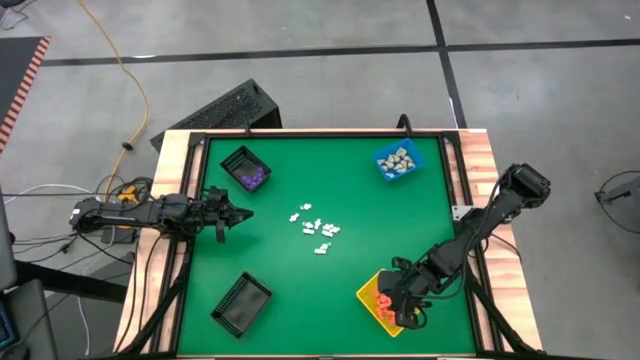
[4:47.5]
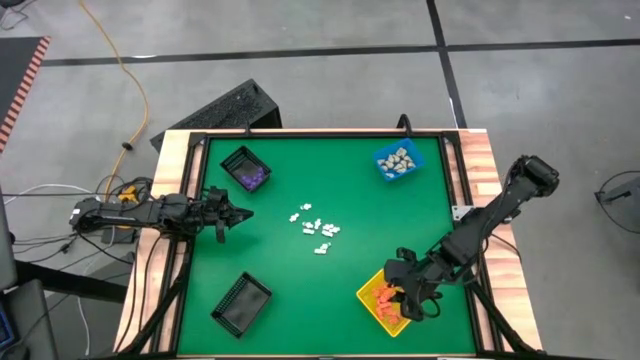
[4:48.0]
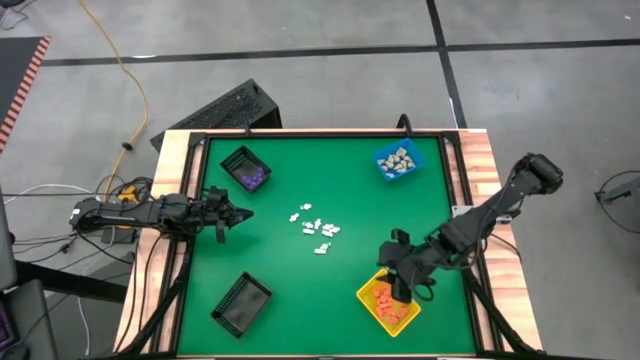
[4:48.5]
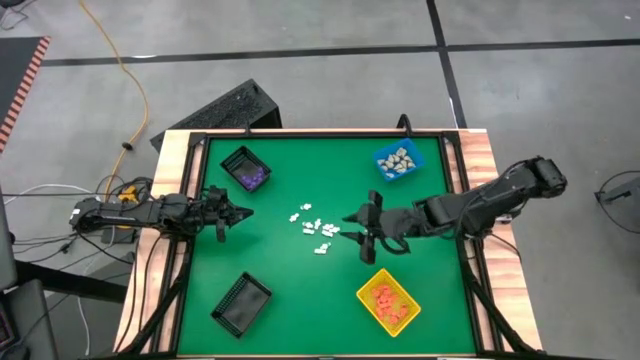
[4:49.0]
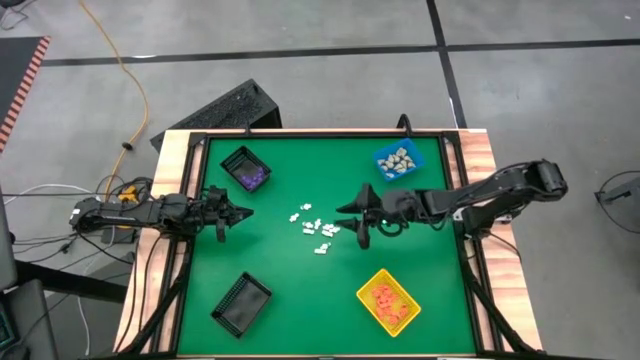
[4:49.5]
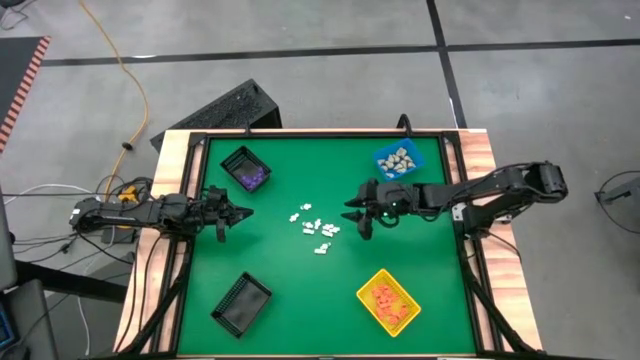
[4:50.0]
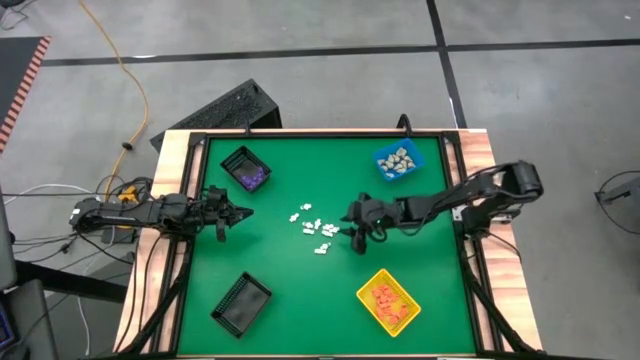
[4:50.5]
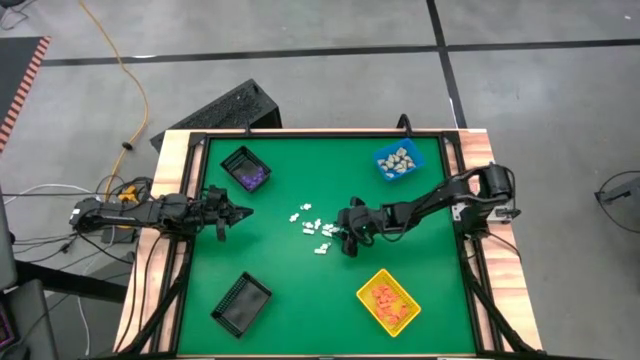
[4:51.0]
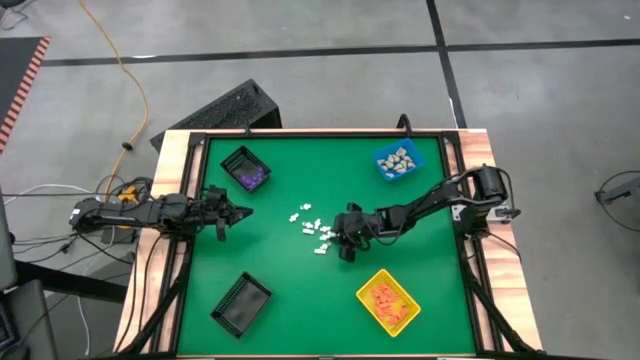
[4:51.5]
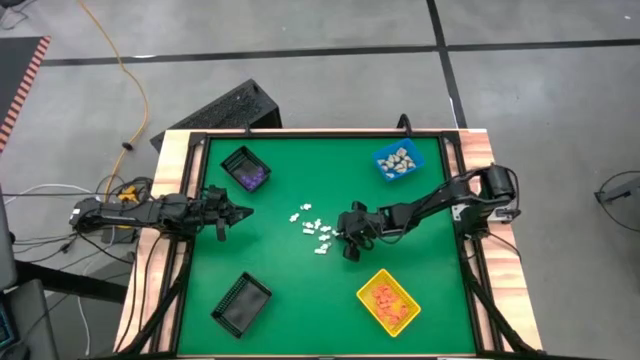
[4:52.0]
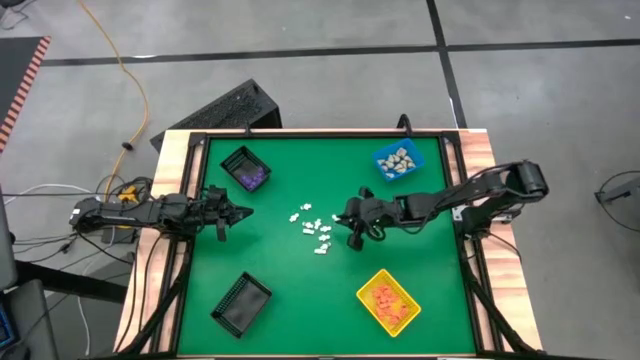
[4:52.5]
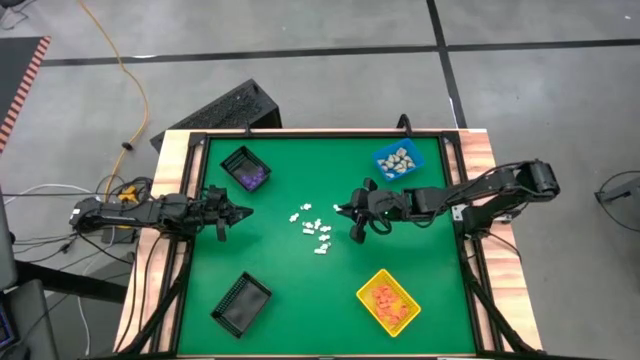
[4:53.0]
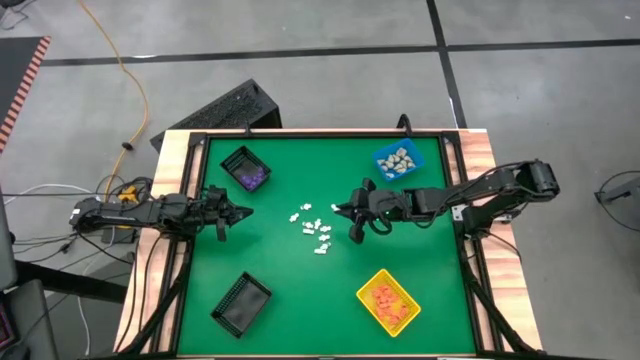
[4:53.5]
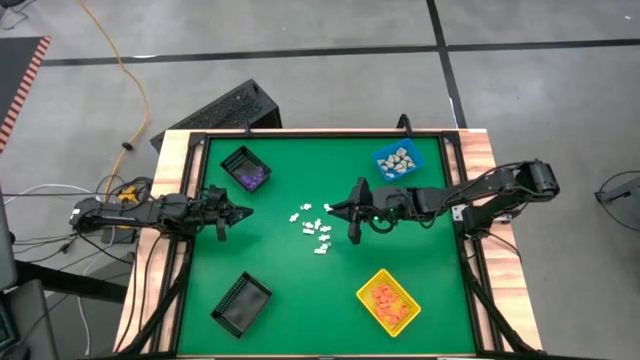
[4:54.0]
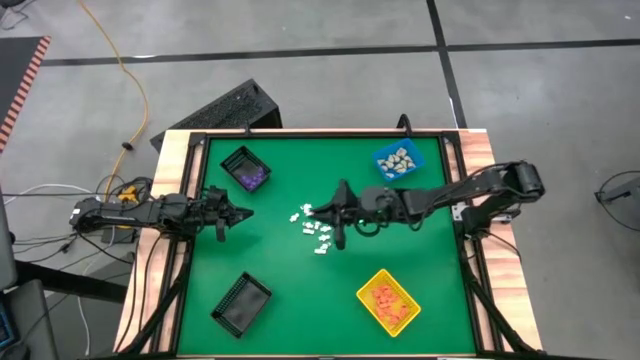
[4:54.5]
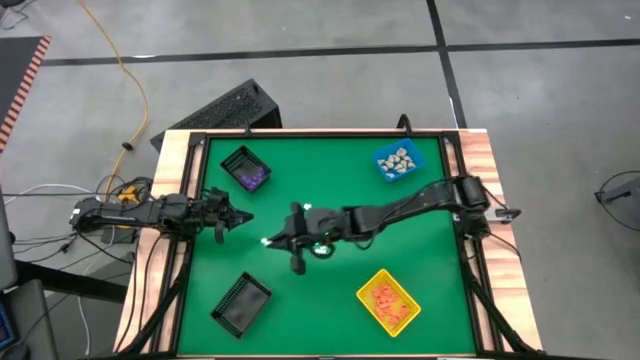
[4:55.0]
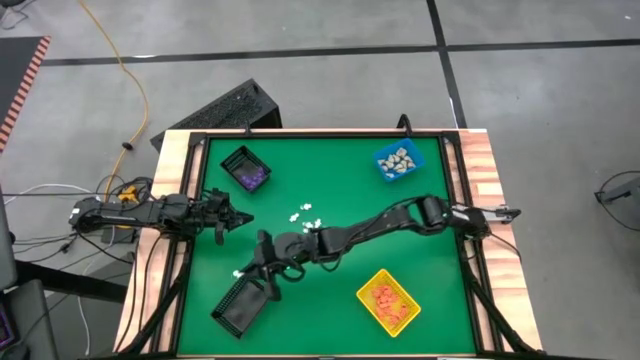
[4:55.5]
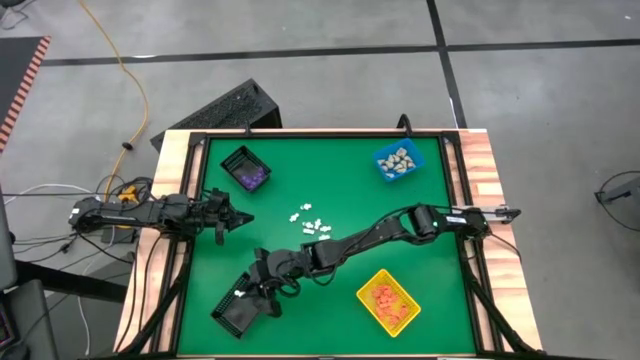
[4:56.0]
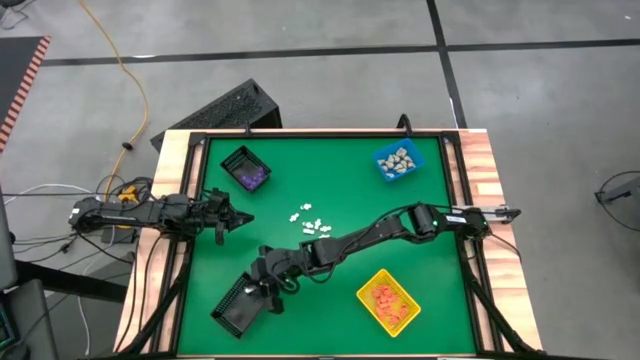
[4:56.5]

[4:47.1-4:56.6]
Task: Sort Halloween decoration
Put the white skeleton toy into the bottom black basket

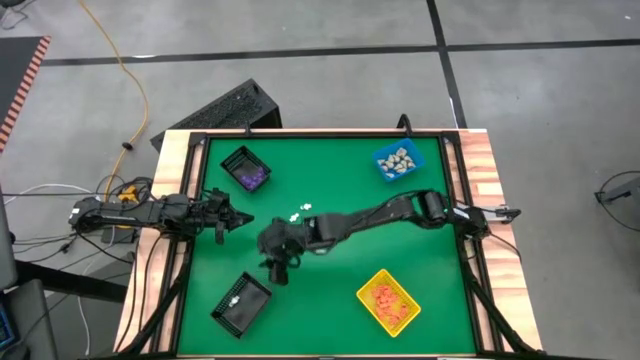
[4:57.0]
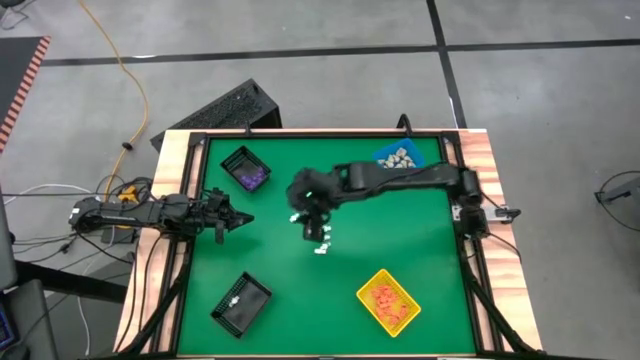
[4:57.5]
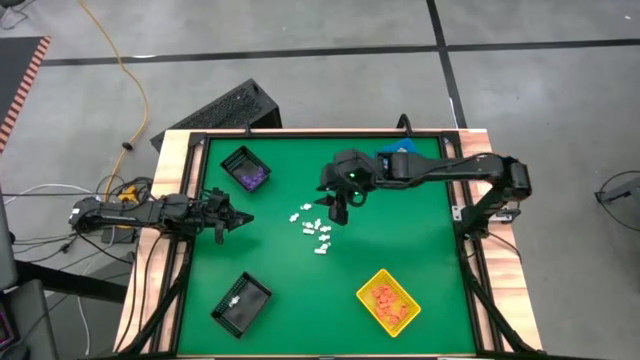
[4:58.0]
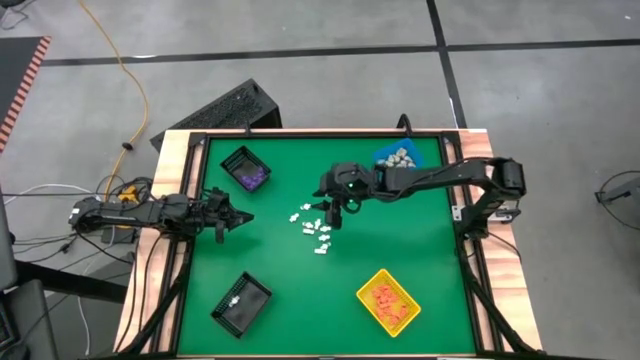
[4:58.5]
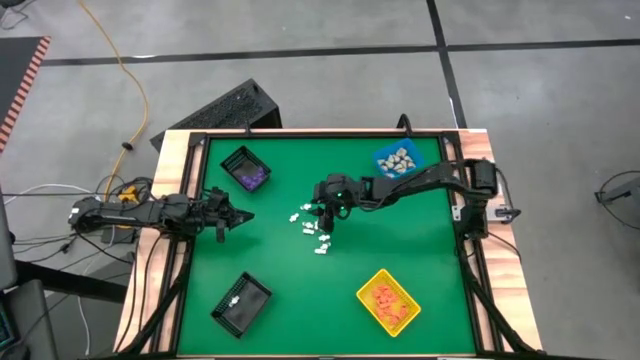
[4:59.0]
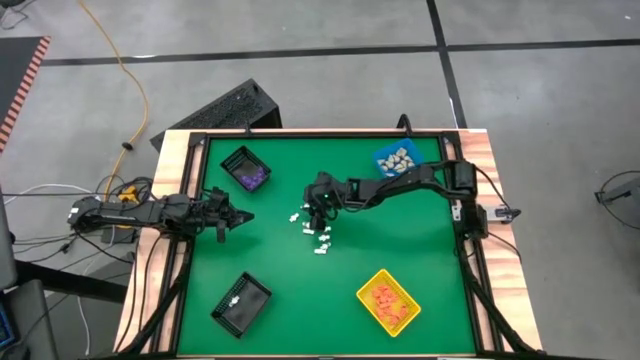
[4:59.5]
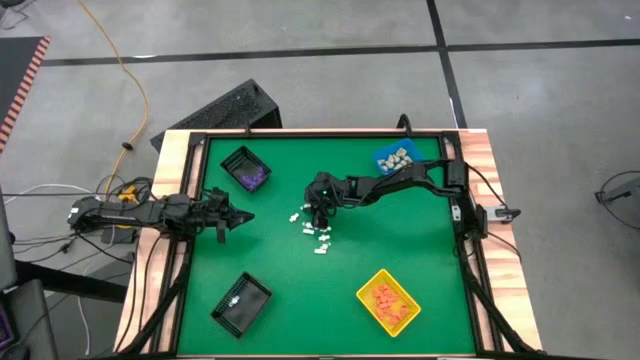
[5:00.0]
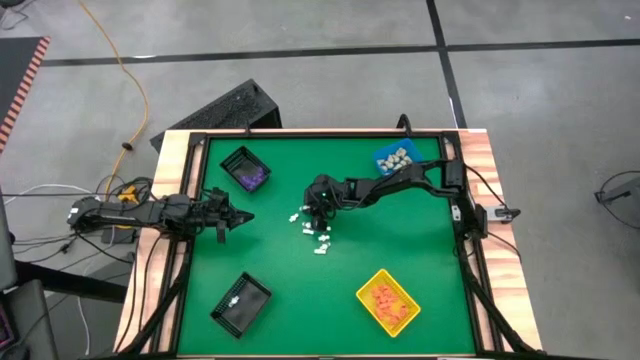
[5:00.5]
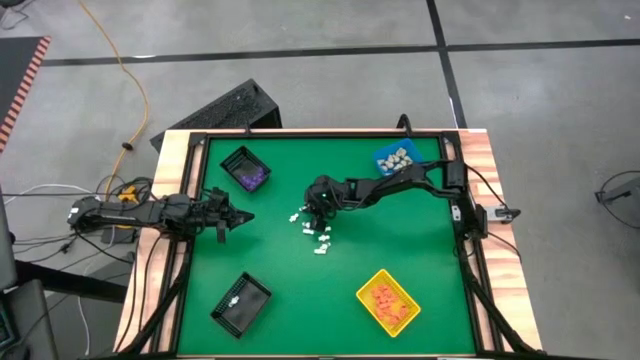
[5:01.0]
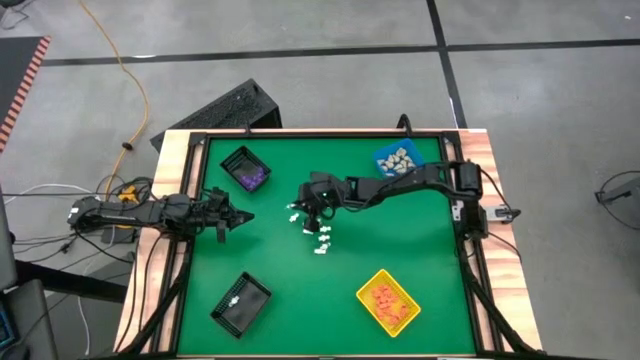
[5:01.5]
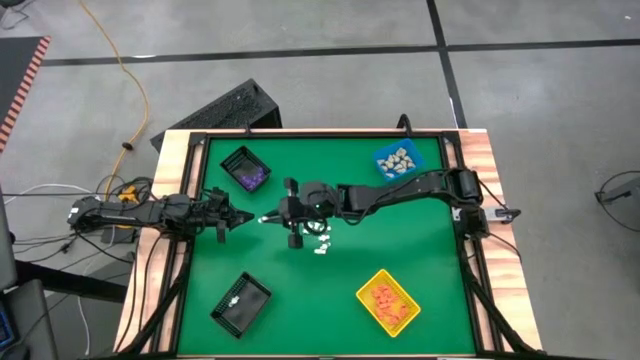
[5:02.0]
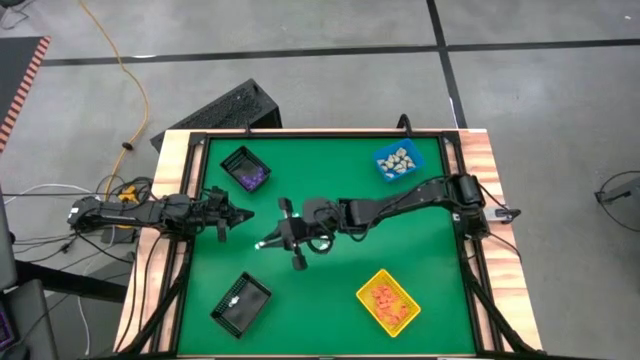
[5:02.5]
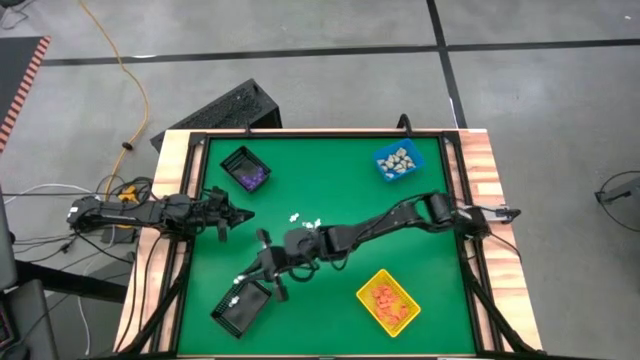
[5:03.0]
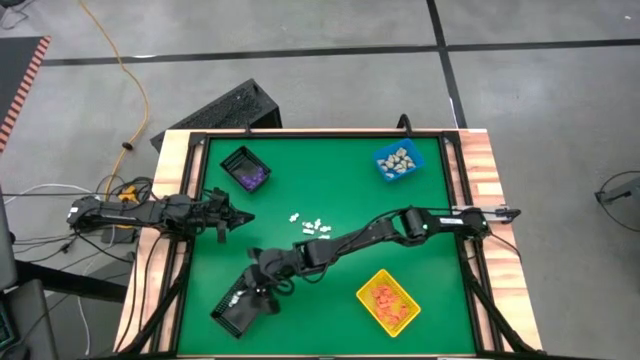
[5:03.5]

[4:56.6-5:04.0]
Put the white skeleton toy into the bottom black basket

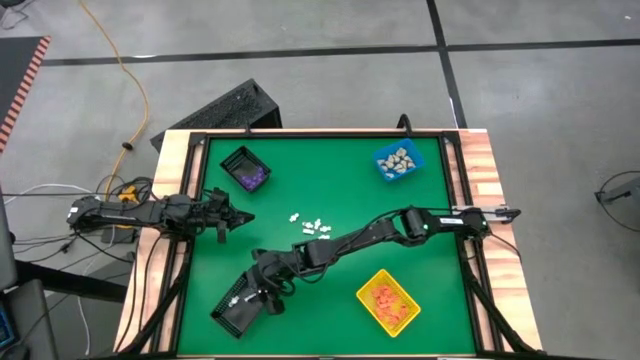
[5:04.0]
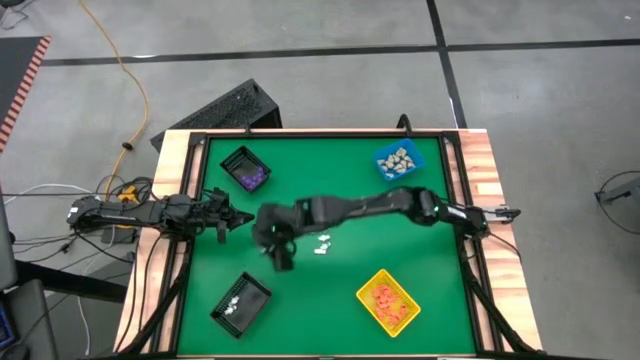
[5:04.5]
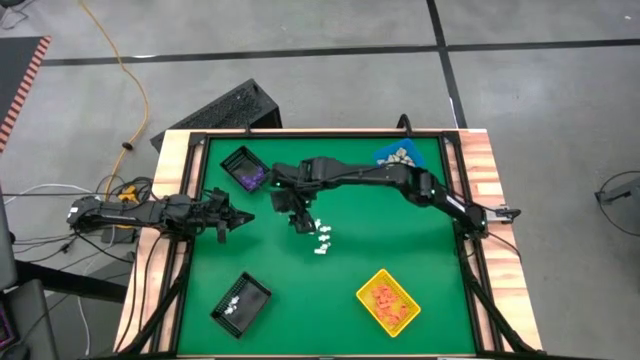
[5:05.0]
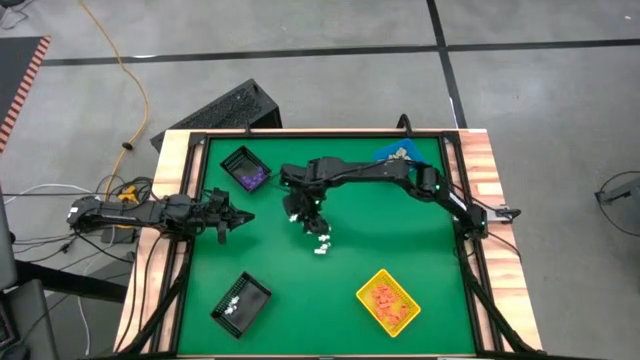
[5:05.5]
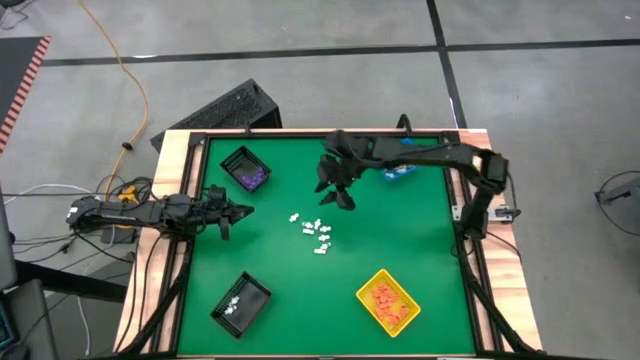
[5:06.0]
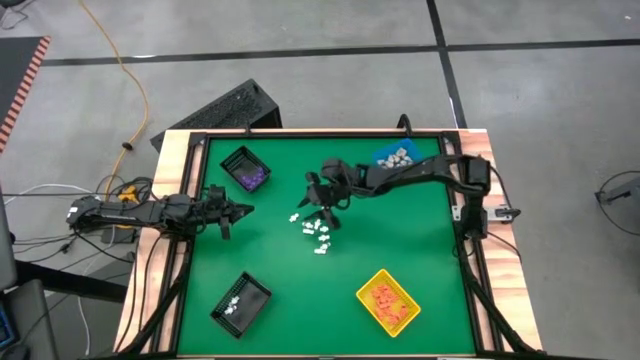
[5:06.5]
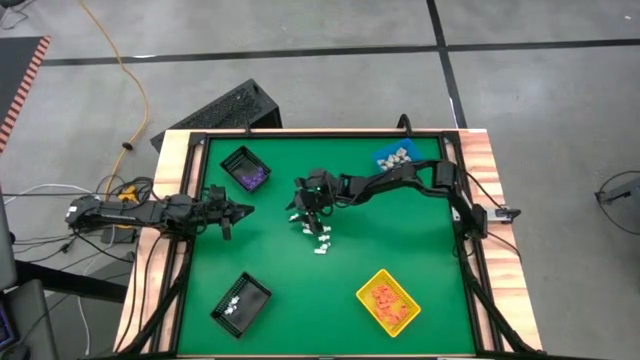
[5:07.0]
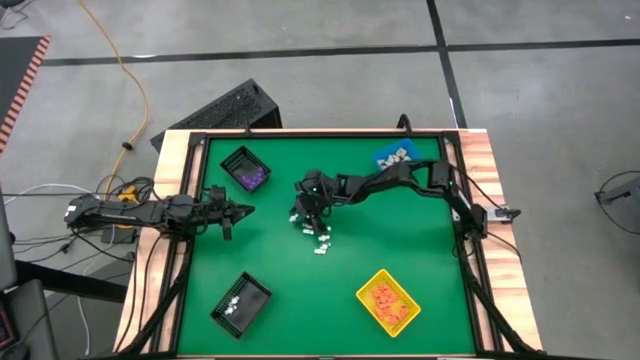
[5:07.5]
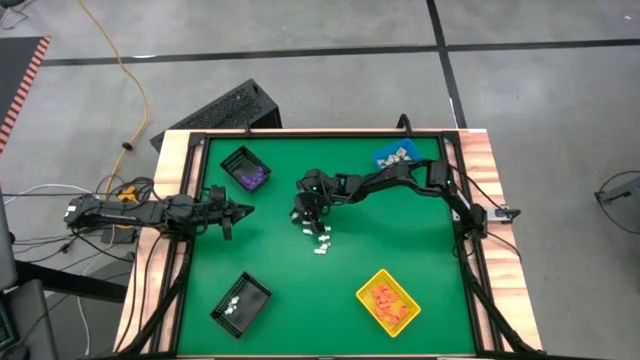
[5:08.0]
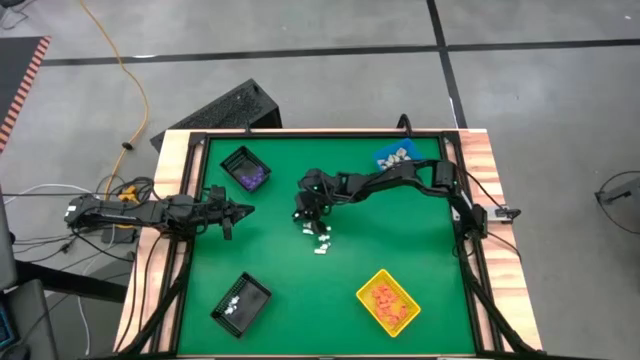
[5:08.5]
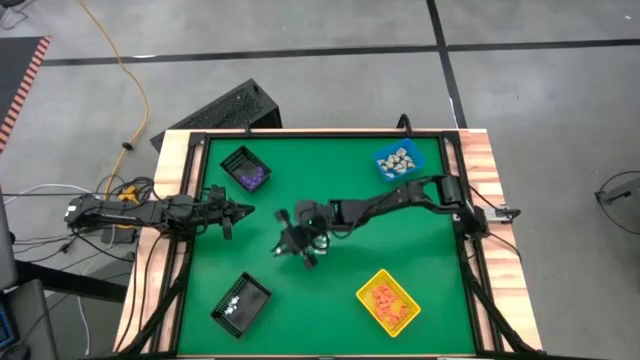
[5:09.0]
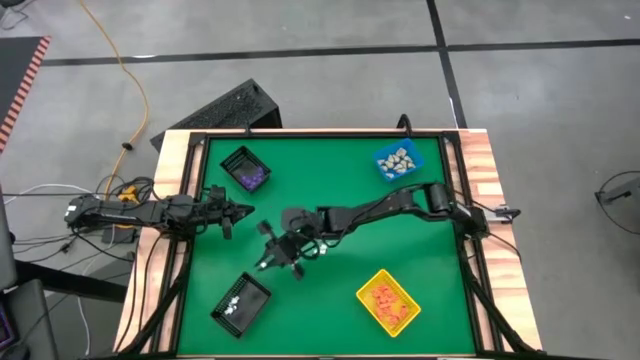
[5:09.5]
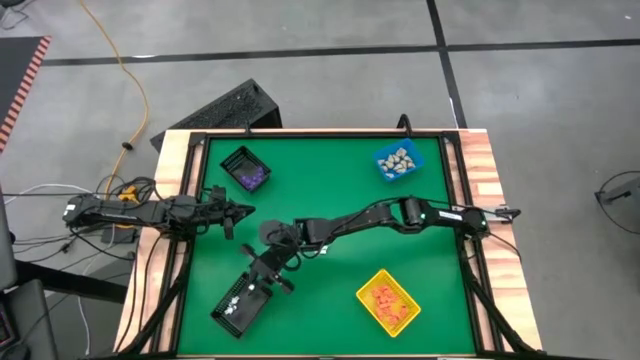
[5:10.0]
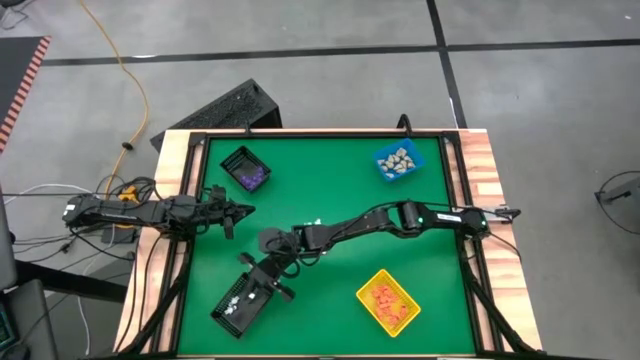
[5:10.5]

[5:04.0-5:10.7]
Put the white skeleton toy into the bottom black basket
